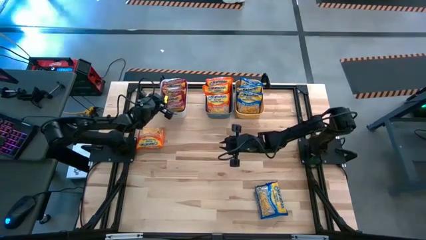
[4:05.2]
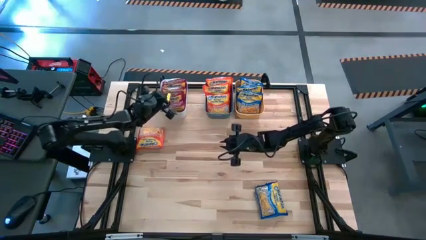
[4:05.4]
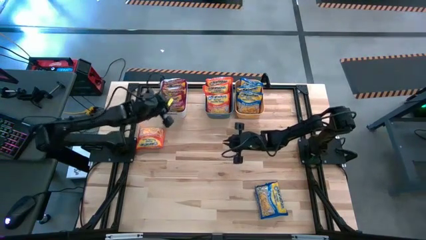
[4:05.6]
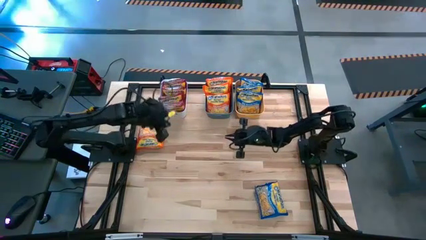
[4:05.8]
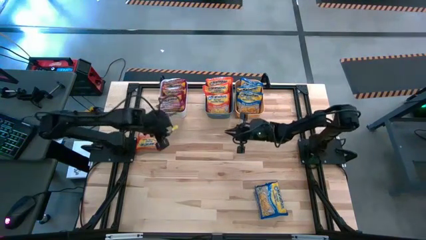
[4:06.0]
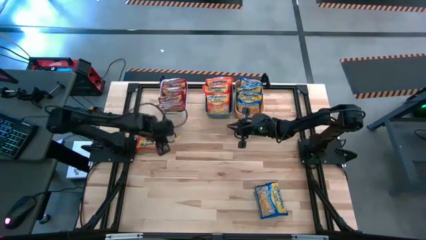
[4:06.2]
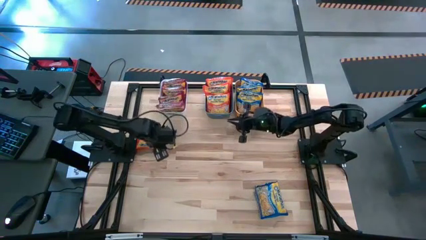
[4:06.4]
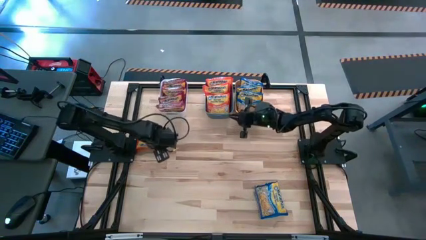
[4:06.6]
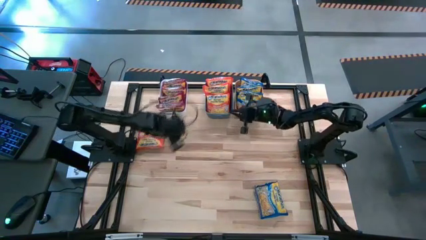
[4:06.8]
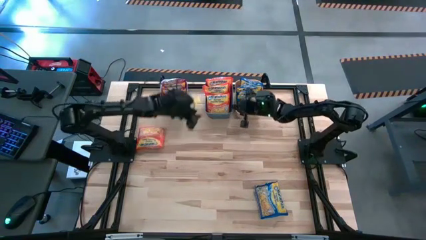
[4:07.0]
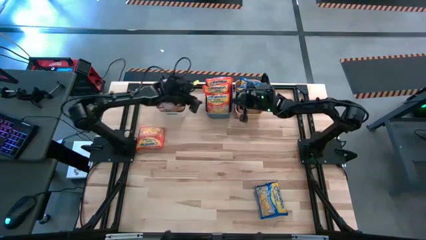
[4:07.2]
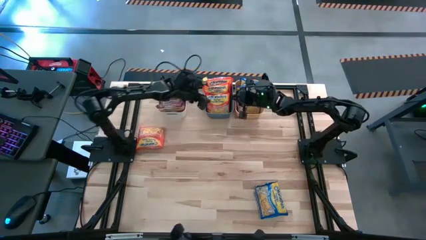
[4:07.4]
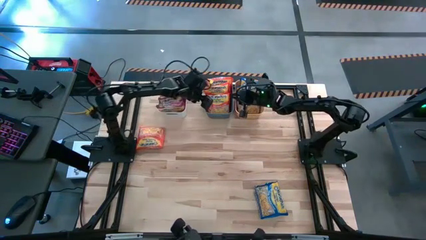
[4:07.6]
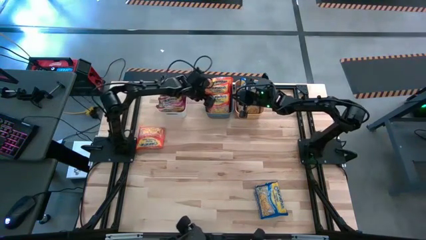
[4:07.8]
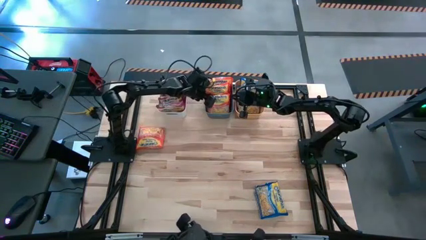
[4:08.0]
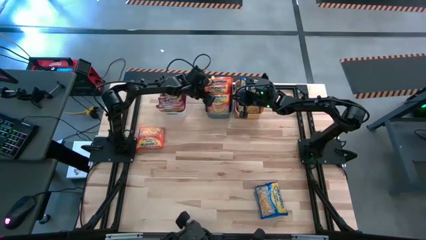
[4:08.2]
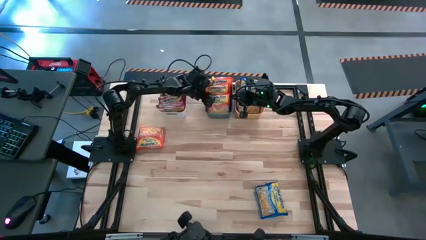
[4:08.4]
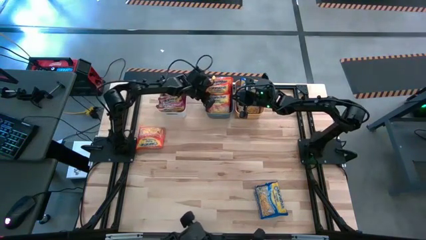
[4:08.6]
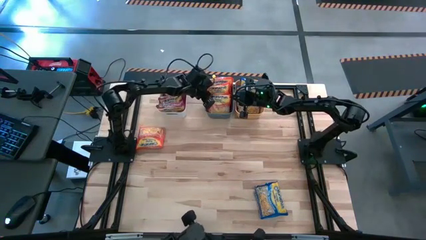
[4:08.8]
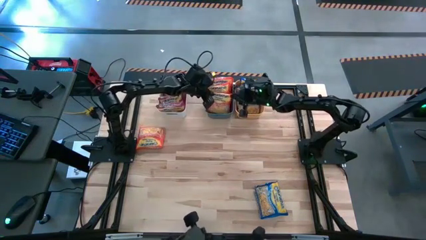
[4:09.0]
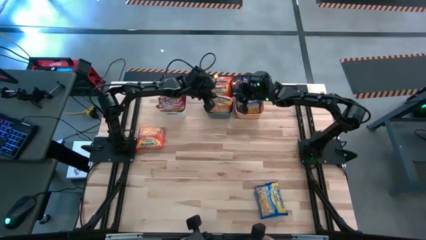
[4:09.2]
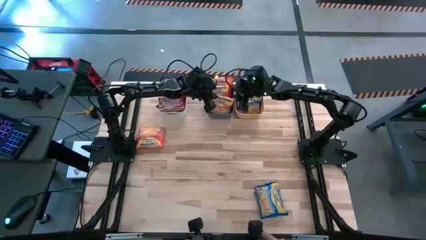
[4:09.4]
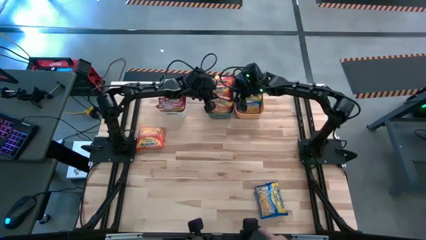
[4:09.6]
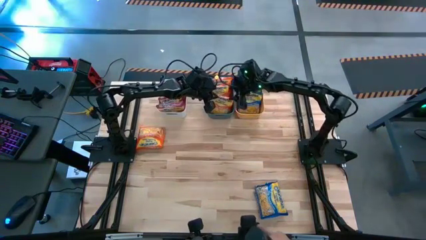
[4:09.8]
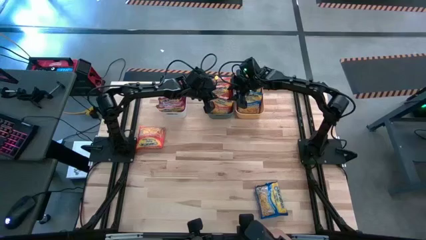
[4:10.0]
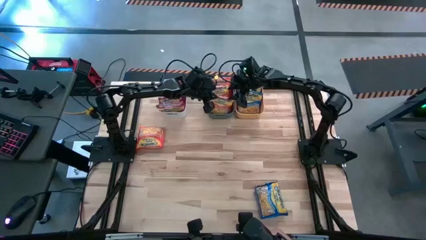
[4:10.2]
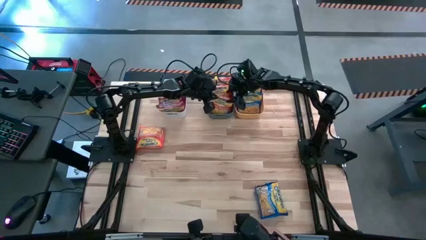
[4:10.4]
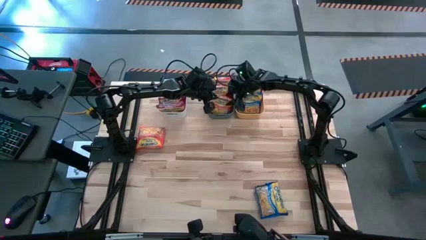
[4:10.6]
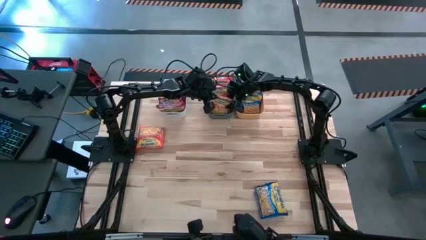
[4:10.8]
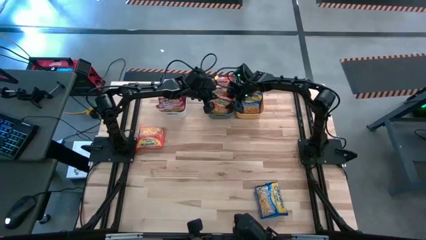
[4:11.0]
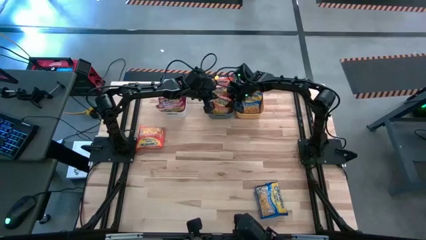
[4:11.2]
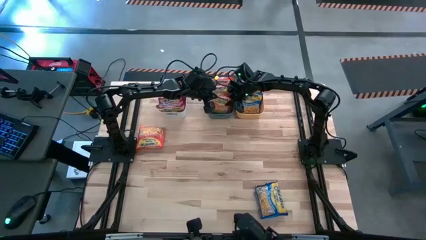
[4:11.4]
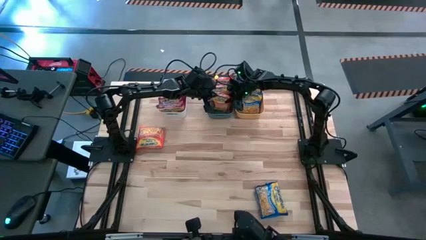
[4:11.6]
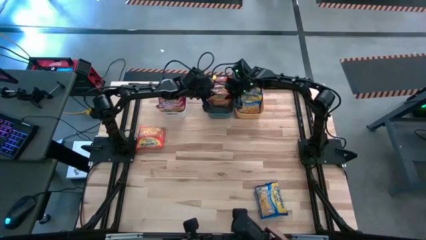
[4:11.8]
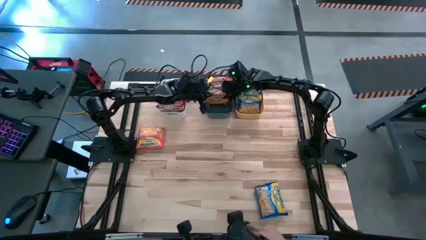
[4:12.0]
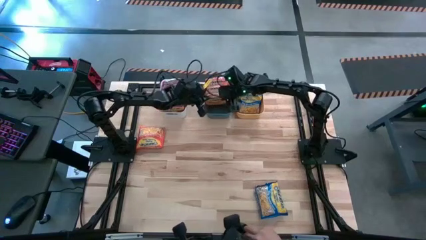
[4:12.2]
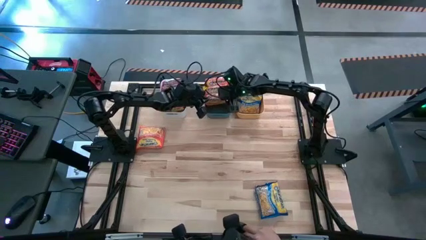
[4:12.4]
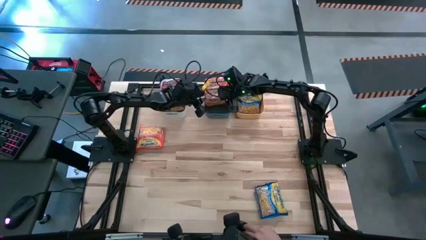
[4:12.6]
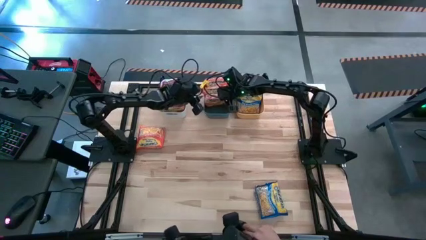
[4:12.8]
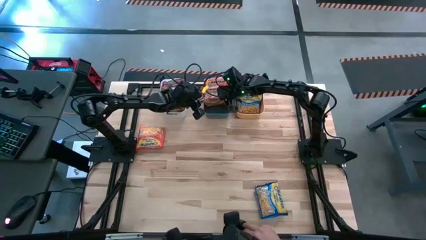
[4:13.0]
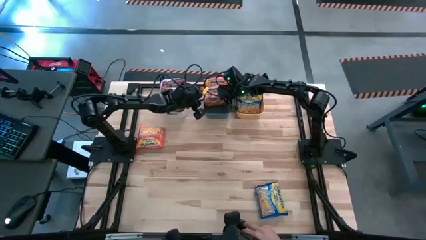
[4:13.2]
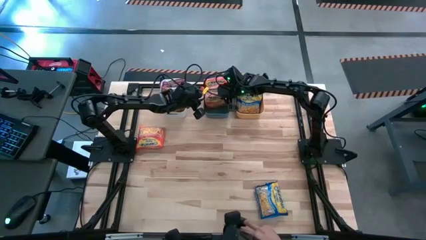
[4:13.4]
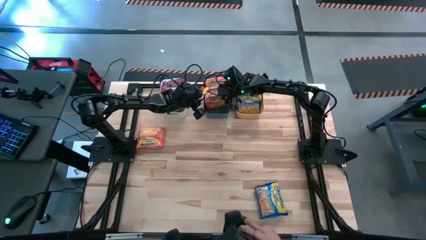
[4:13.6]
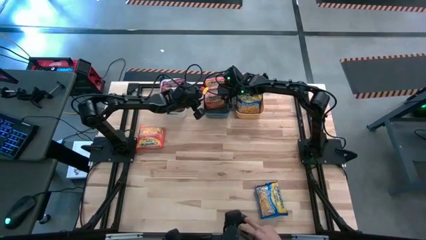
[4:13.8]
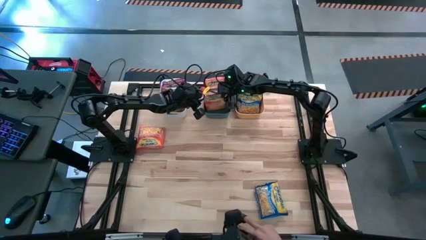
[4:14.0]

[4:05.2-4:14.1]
Task: Sort Maruchan noodles
Adjust the orange noodle pack into the blue bin

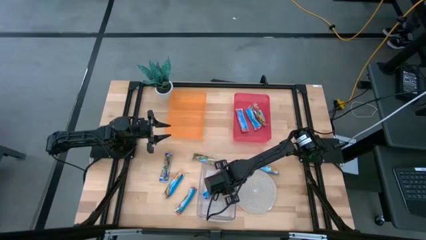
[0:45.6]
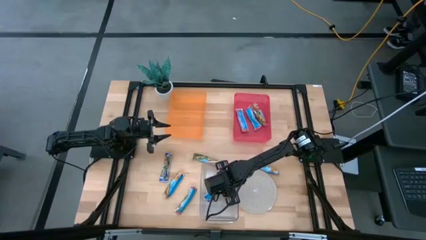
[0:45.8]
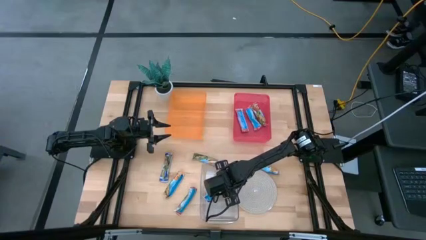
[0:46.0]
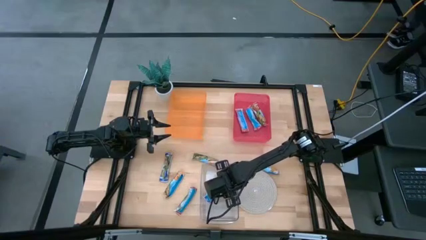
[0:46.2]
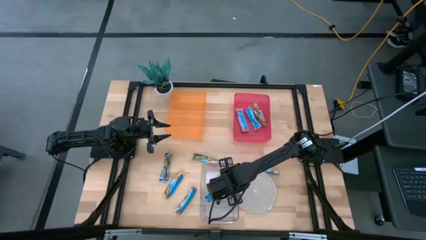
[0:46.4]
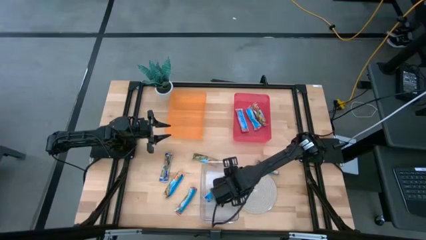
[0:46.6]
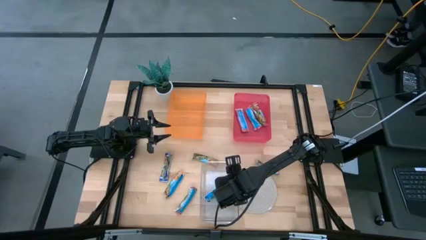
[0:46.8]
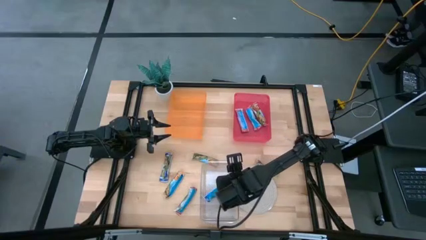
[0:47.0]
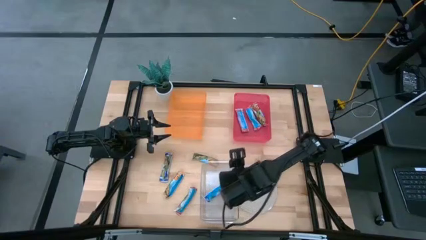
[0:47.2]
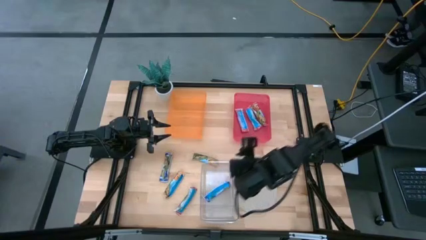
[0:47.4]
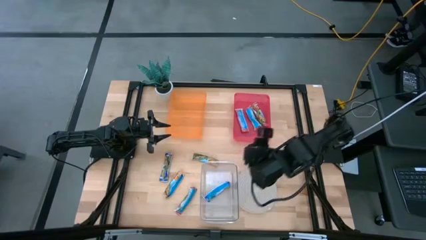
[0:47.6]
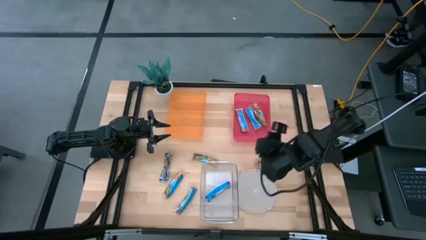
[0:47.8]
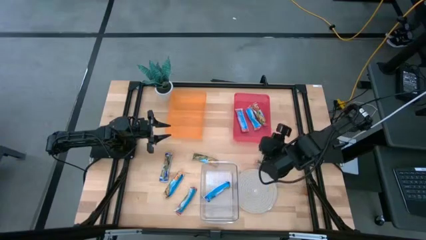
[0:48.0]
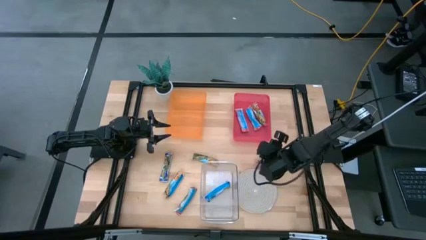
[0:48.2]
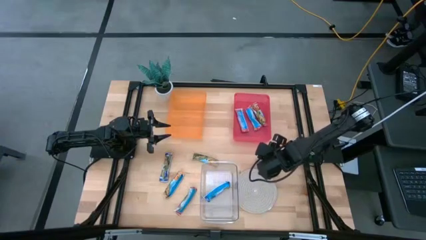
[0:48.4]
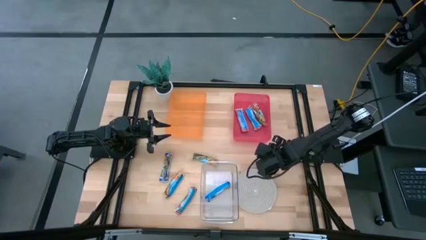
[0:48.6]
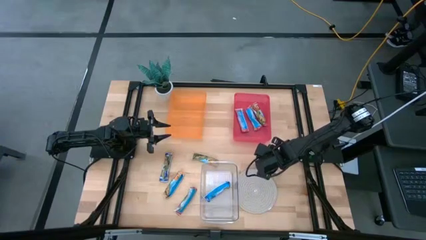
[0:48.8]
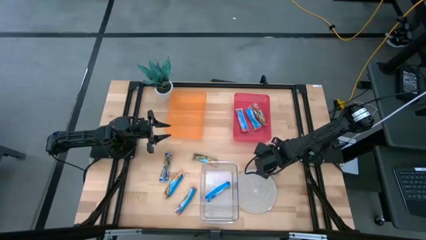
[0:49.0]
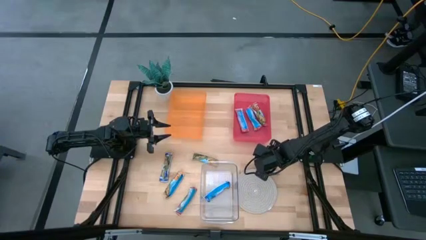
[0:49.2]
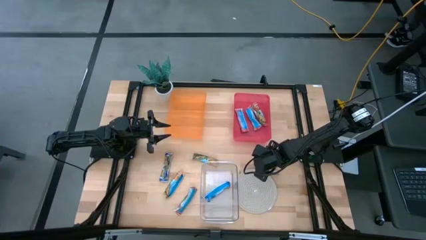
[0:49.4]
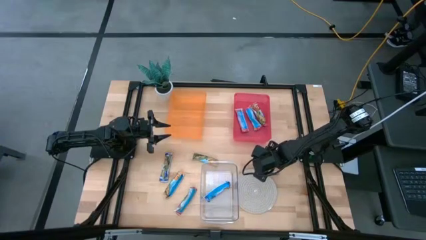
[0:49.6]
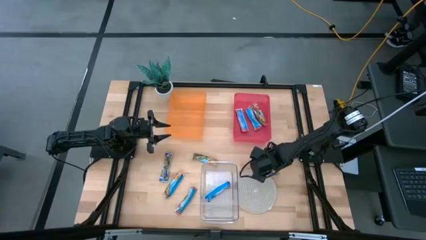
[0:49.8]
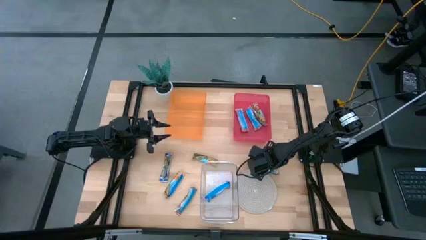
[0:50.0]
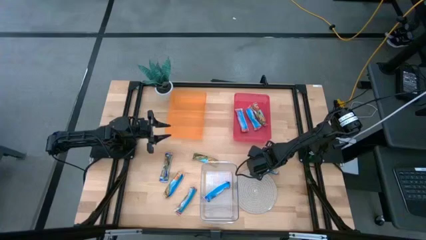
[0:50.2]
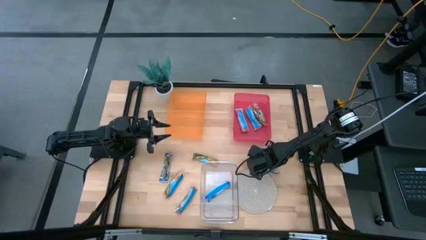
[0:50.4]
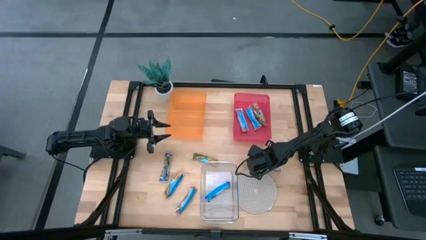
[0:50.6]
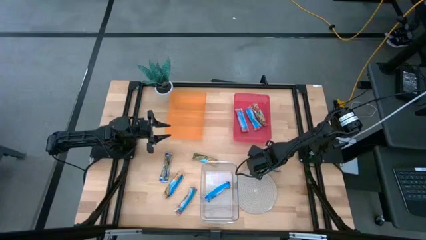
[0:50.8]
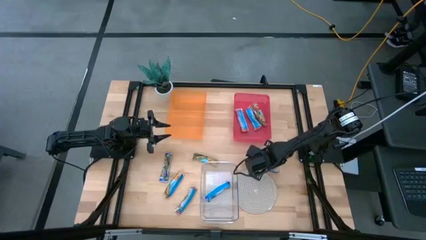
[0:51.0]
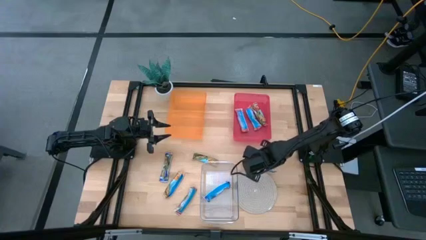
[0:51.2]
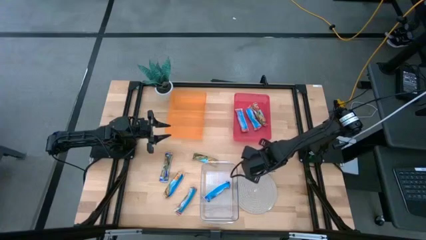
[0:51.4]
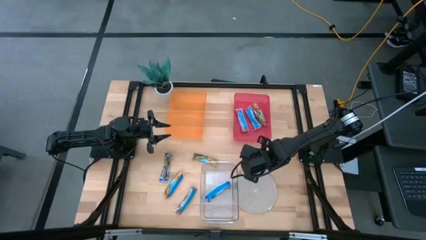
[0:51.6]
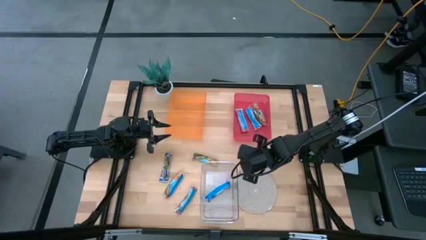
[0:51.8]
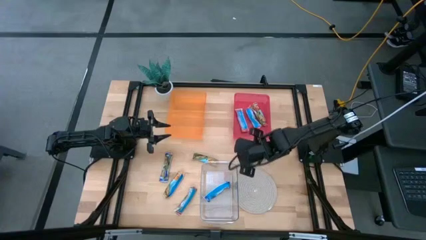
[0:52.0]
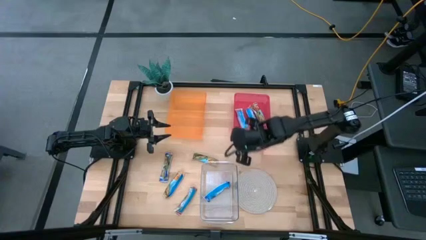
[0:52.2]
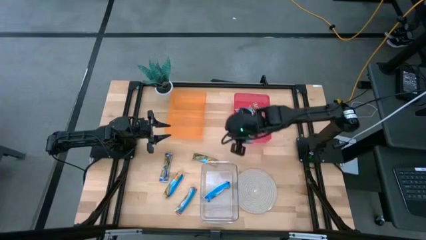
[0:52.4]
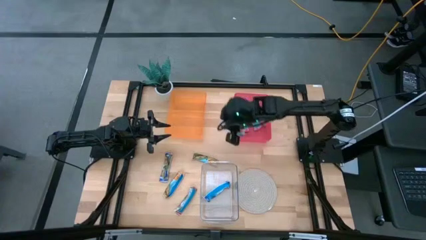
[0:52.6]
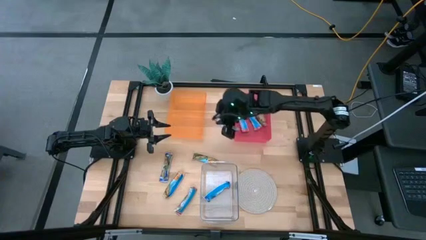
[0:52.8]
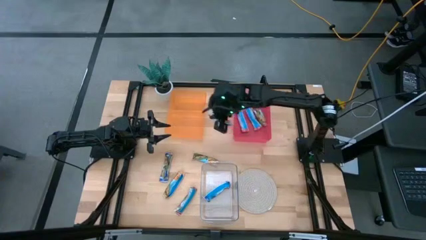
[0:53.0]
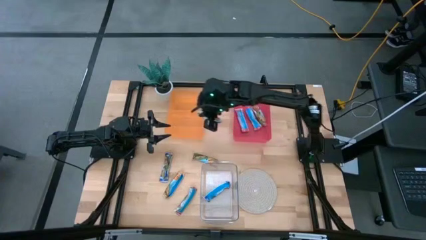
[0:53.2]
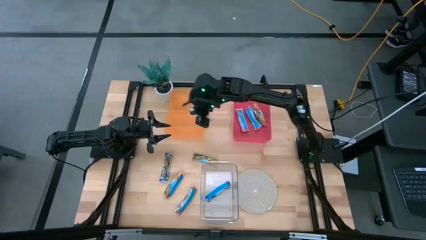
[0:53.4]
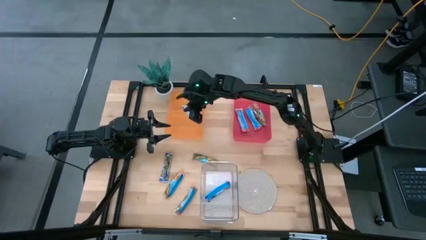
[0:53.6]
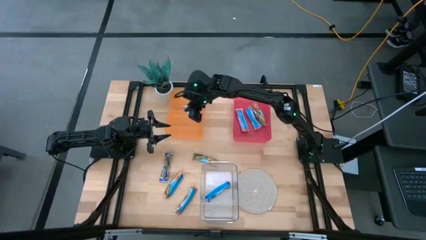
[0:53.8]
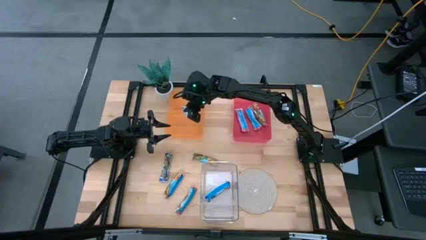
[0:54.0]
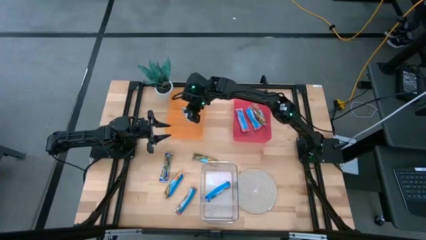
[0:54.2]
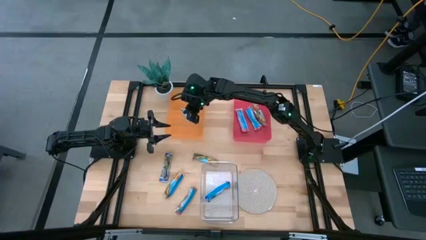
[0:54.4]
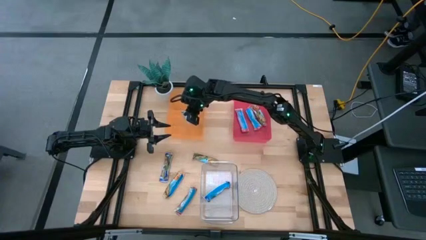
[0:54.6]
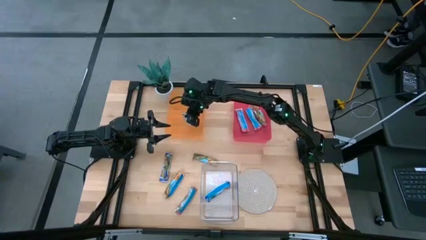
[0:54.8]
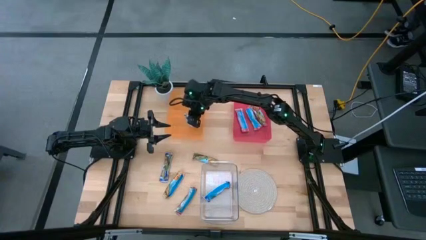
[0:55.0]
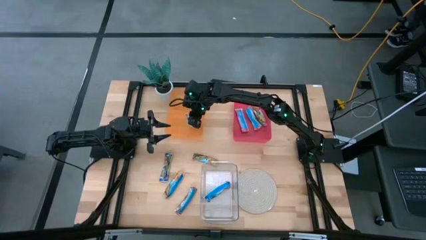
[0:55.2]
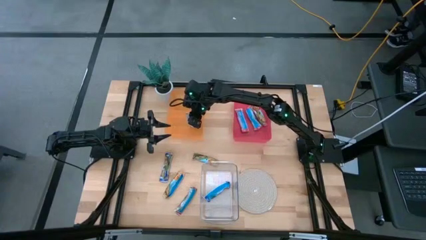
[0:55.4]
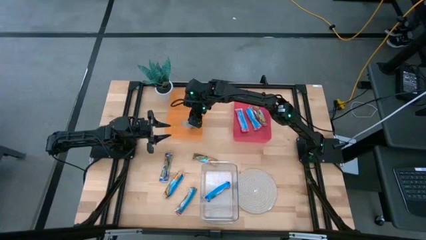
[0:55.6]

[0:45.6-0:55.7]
Task: Pick and place Granola Bars by type
Put the yellow granola bar into the orange bin
